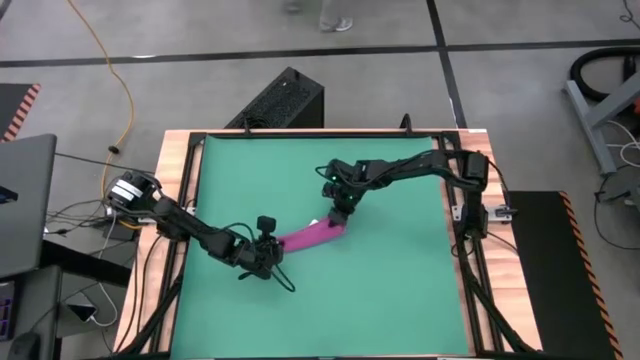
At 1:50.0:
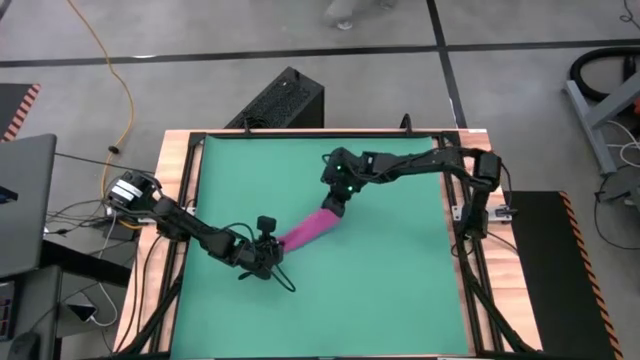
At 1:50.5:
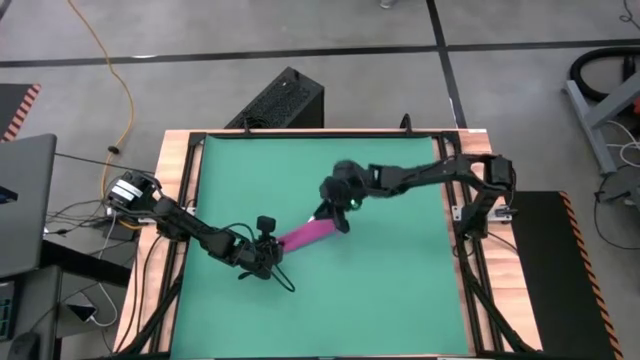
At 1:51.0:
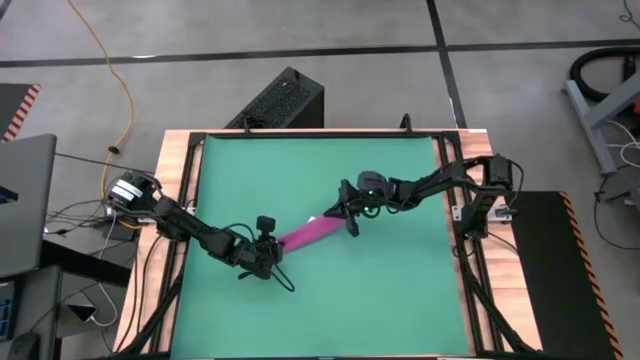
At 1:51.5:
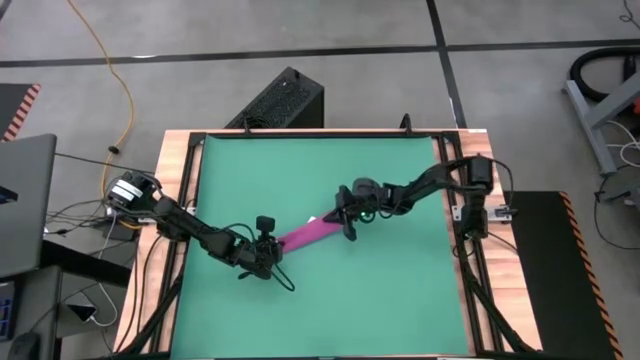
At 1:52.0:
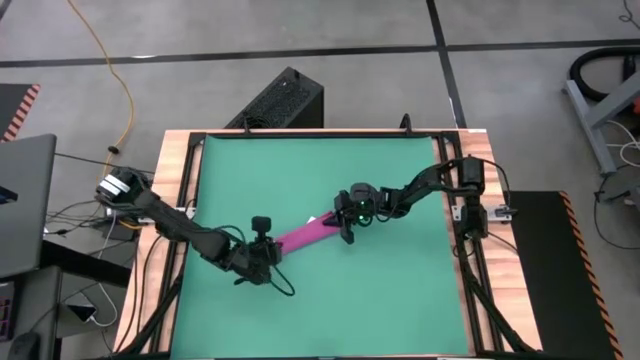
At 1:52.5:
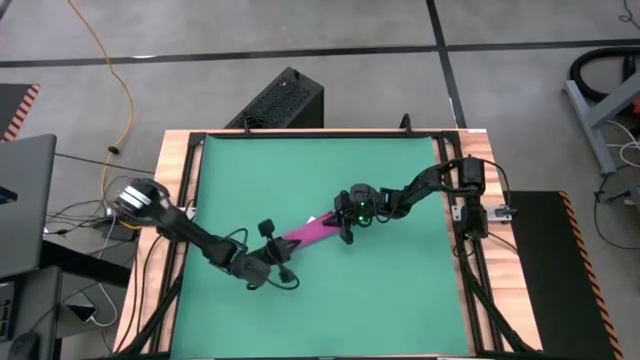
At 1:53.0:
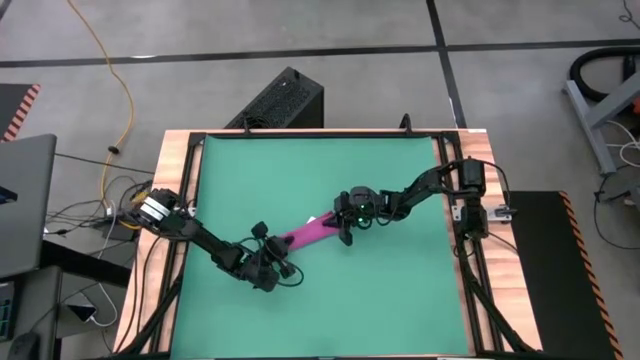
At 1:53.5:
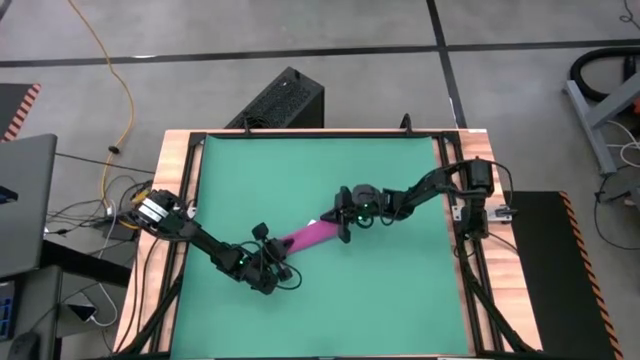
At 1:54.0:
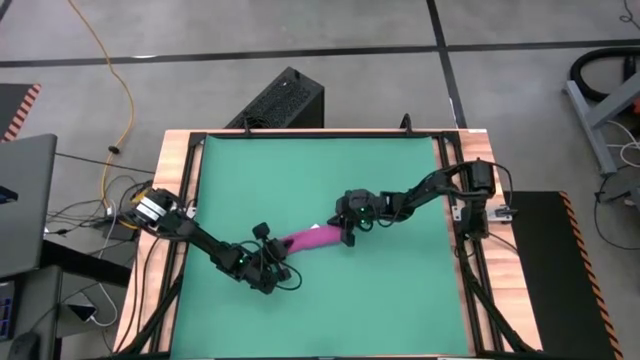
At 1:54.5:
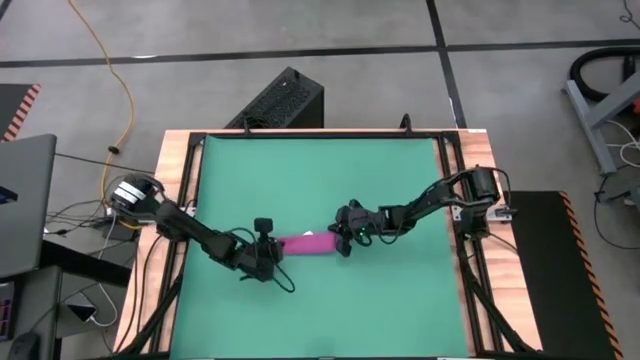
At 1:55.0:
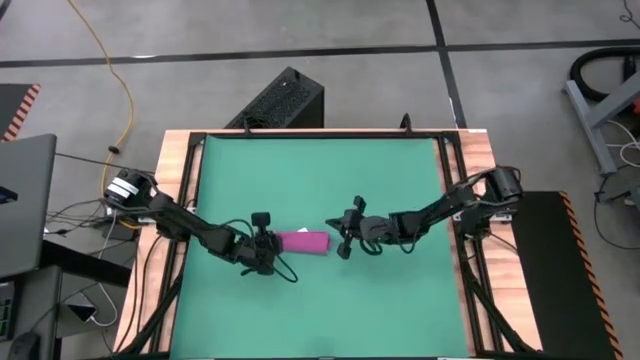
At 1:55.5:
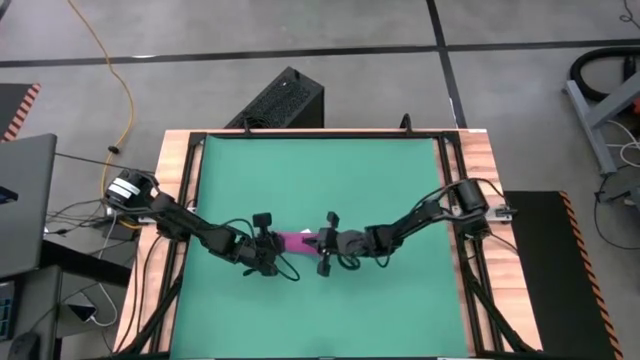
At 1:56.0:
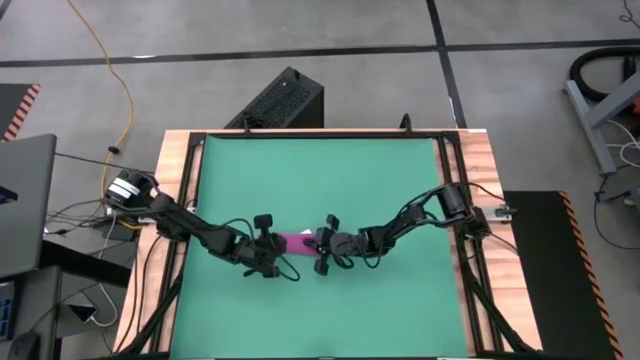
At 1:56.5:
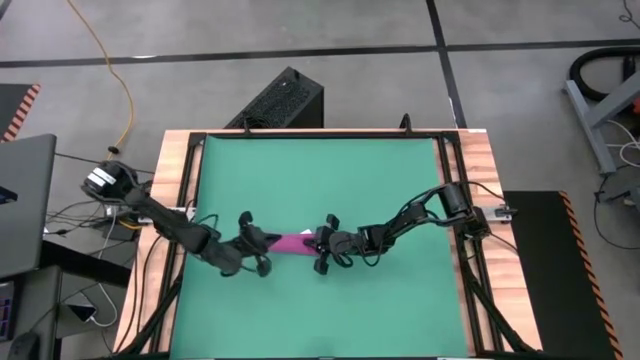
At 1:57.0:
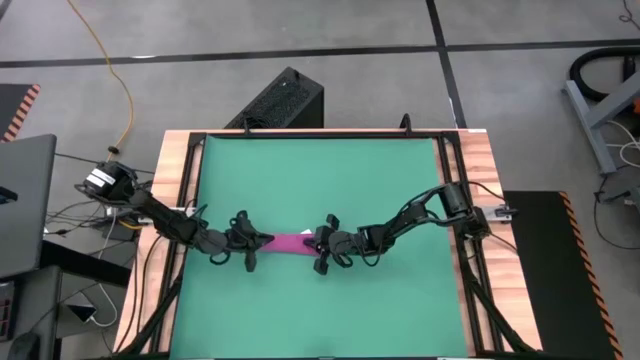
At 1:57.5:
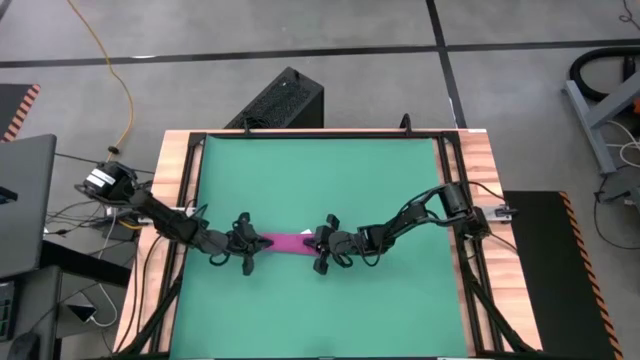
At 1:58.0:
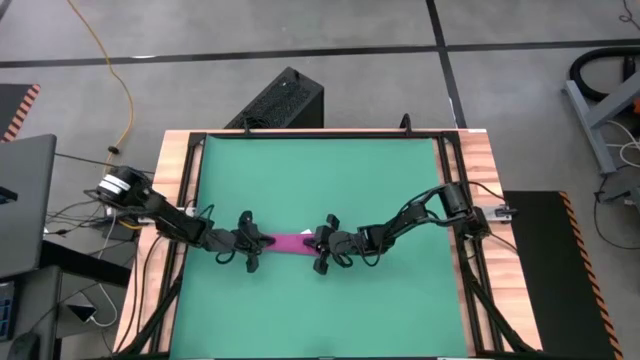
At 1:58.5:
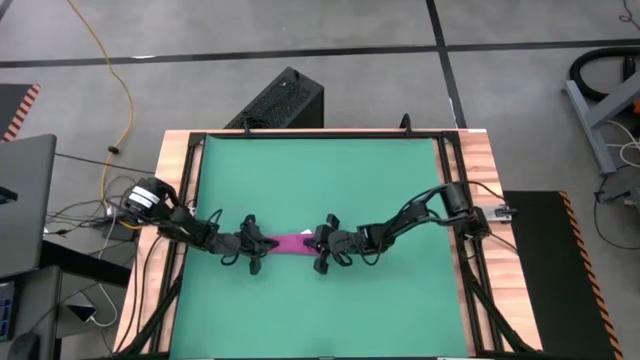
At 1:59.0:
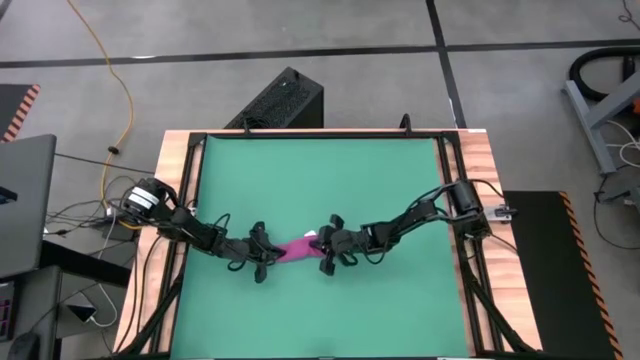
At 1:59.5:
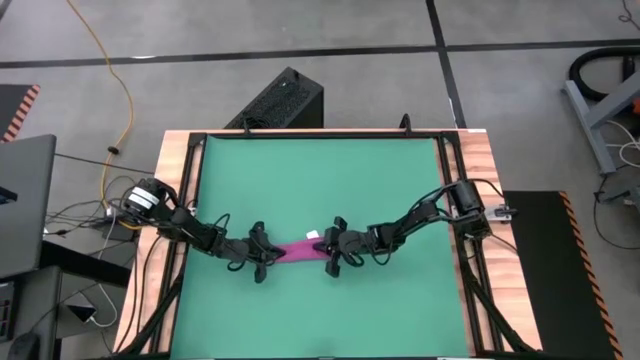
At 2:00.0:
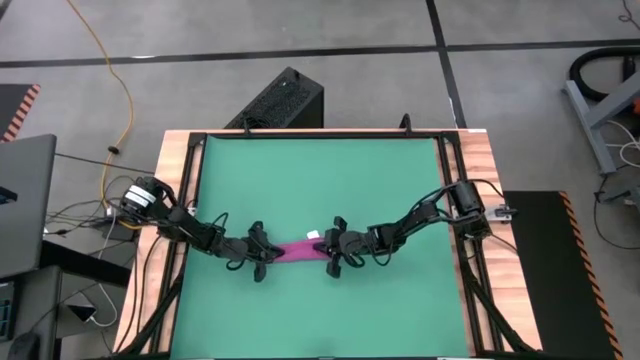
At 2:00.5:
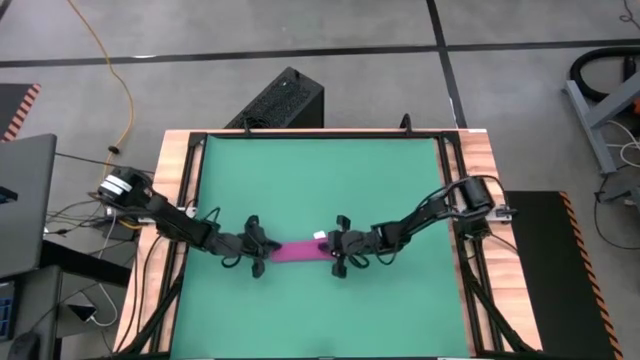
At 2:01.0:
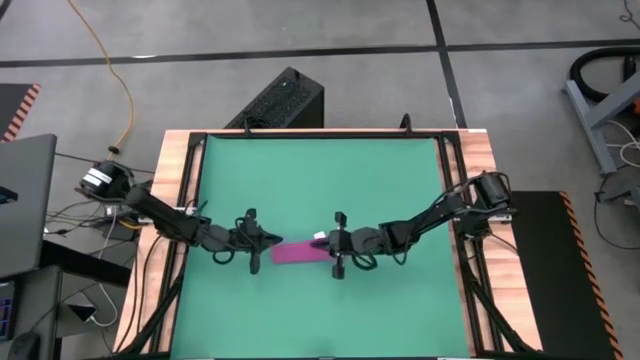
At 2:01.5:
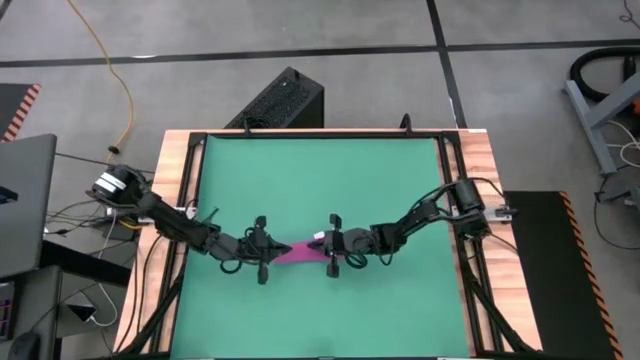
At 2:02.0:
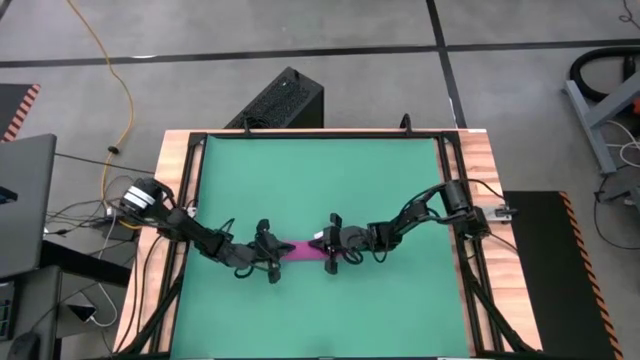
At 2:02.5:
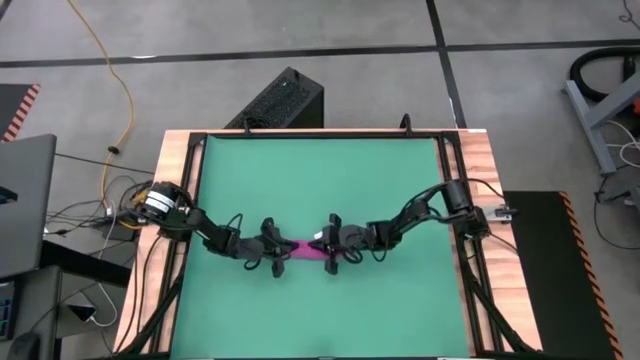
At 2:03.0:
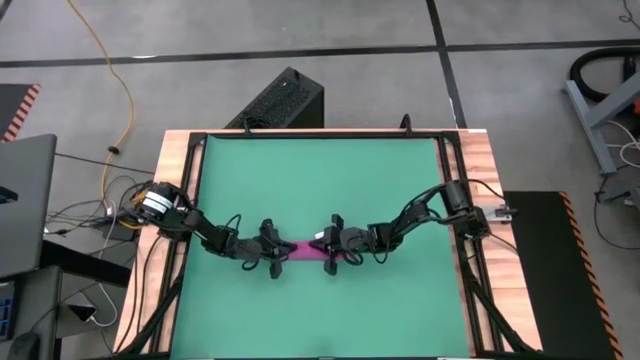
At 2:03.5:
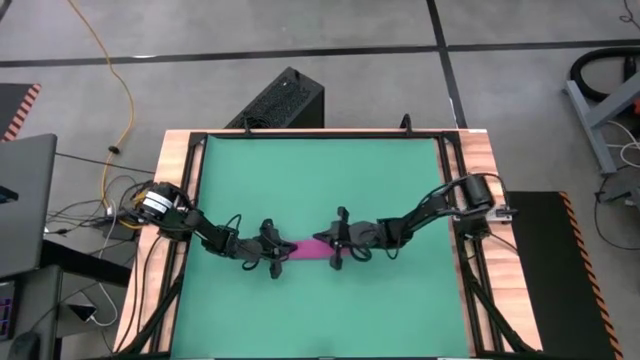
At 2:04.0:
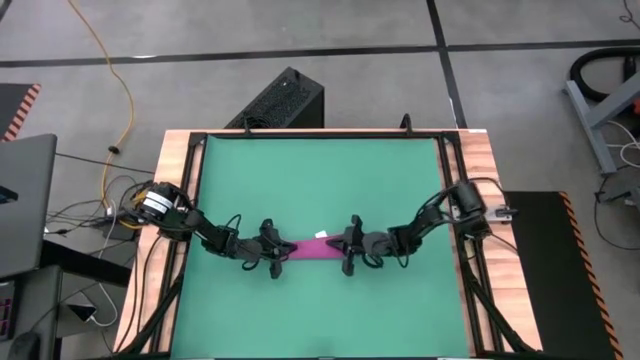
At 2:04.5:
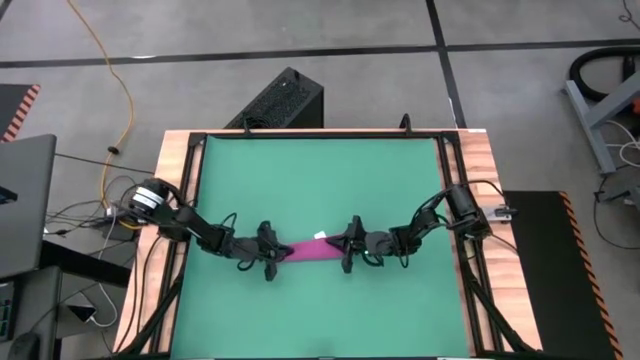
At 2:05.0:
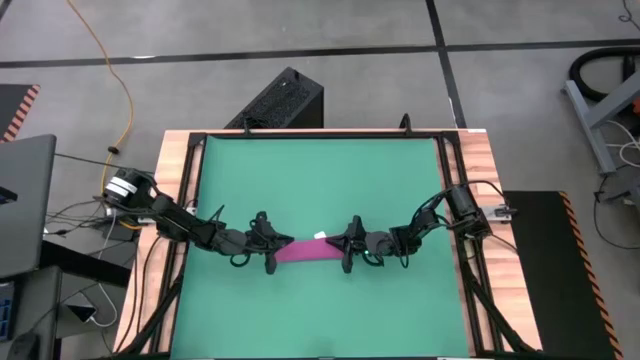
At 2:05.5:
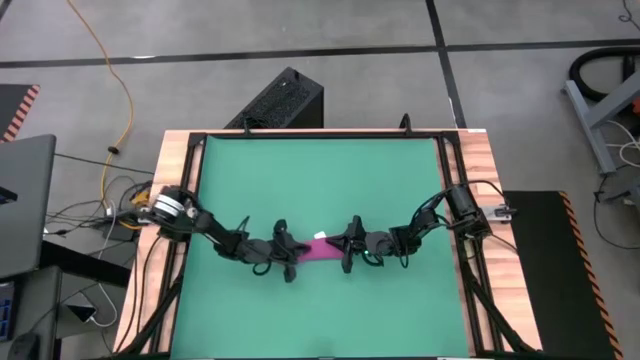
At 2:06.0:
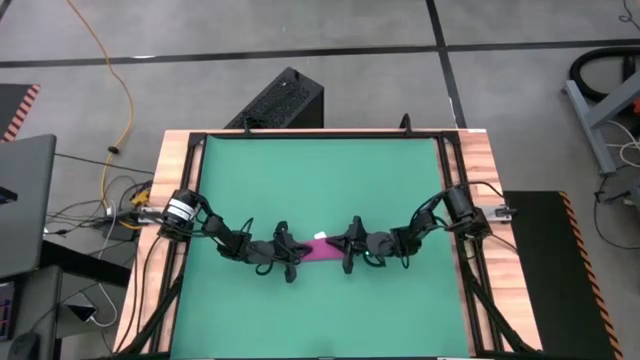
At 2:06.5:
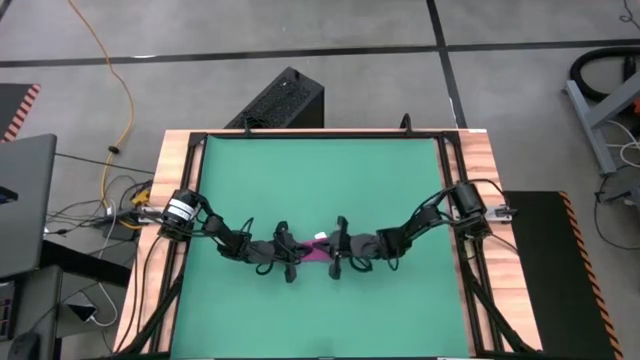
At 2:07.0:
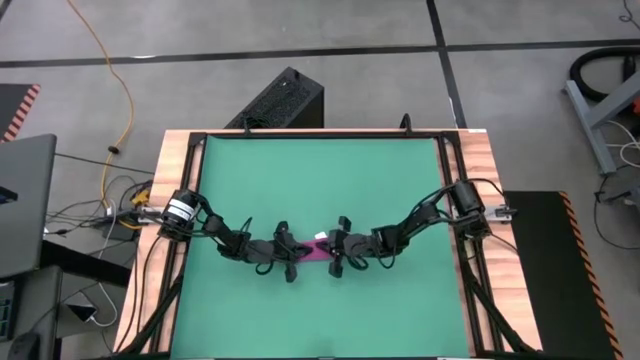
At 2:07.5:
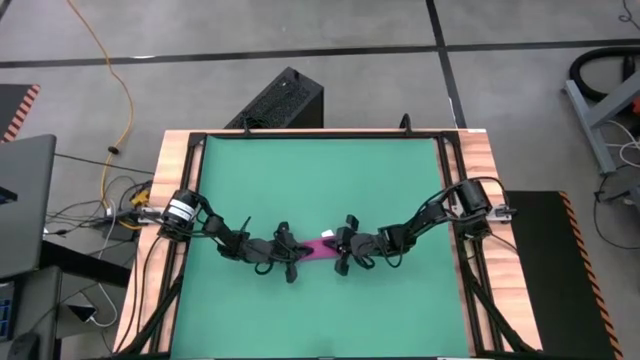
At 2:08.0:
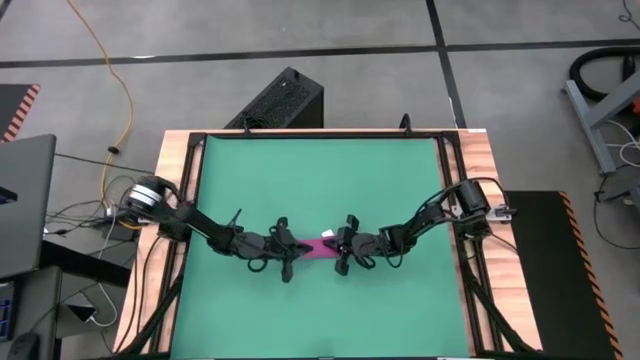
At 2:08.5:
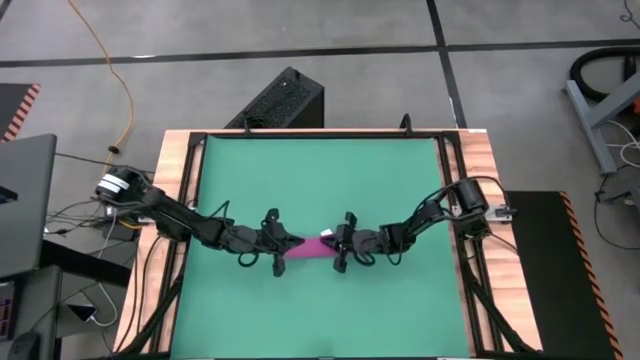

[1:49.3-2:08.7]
Task: Roll towel
Roll the violet towel
